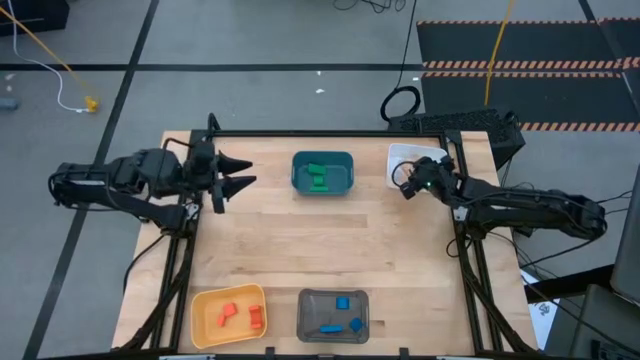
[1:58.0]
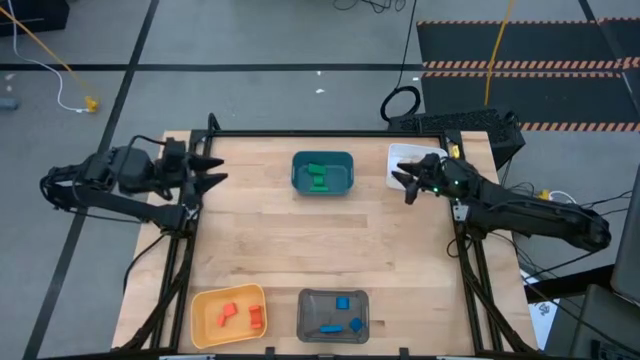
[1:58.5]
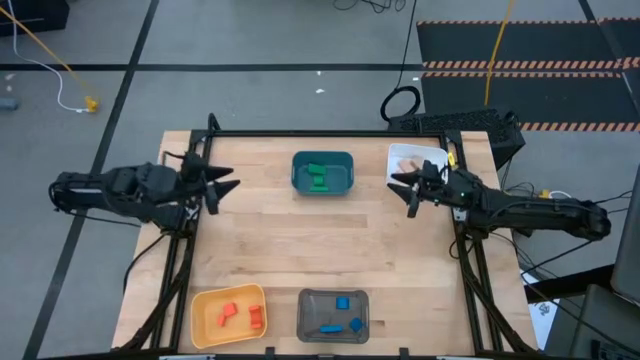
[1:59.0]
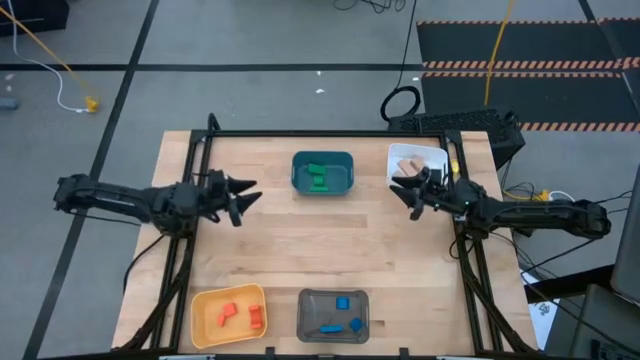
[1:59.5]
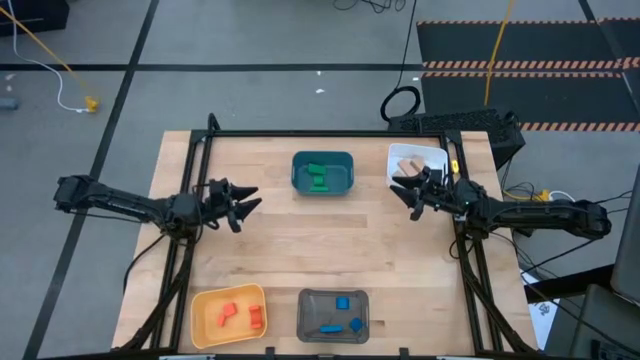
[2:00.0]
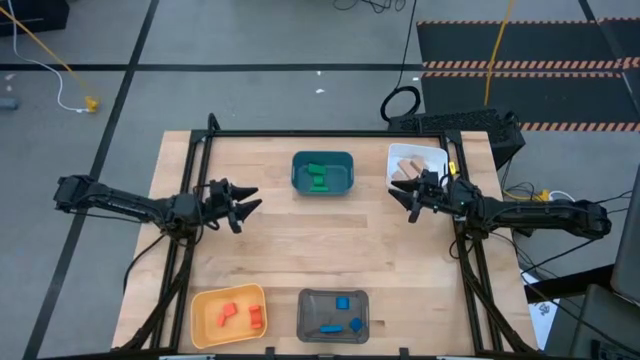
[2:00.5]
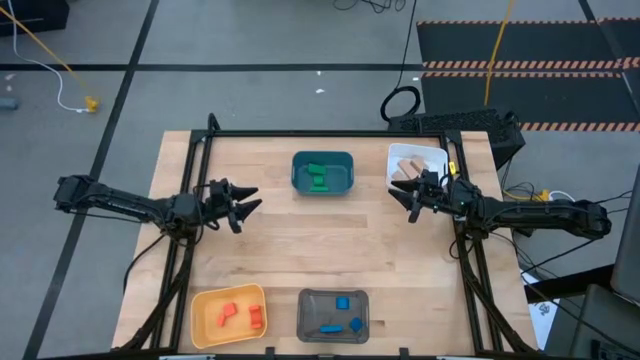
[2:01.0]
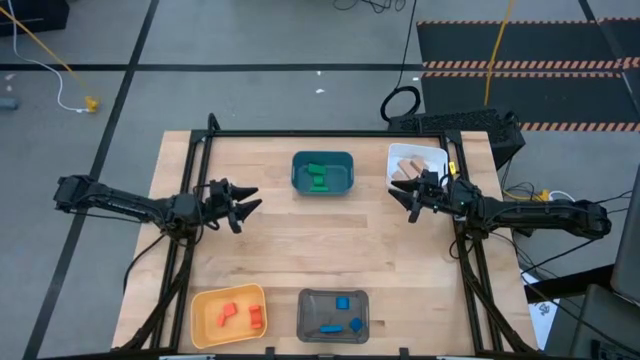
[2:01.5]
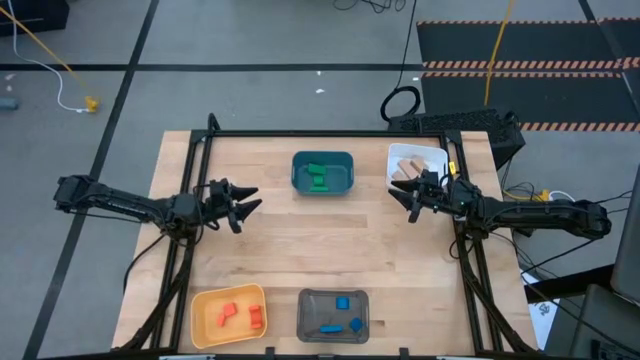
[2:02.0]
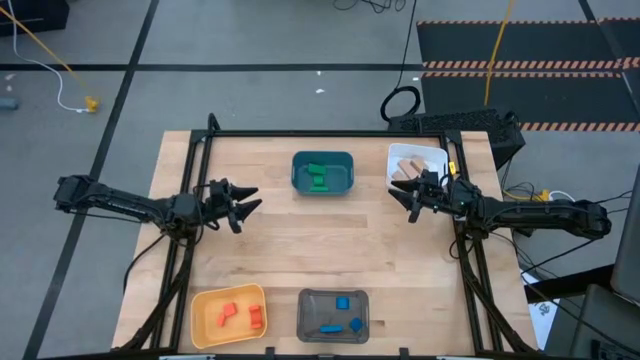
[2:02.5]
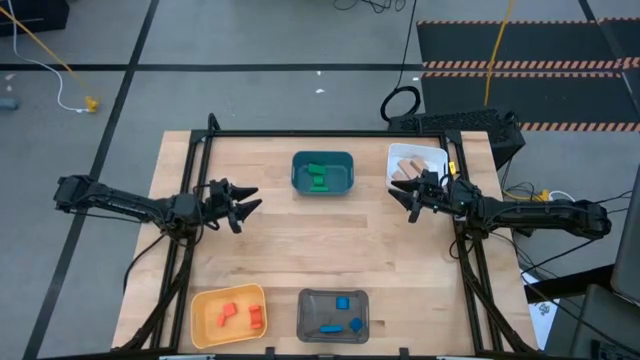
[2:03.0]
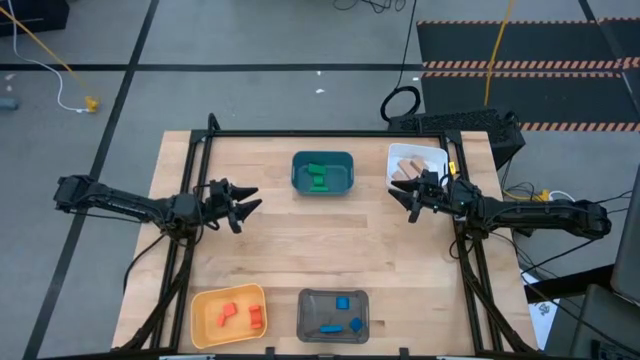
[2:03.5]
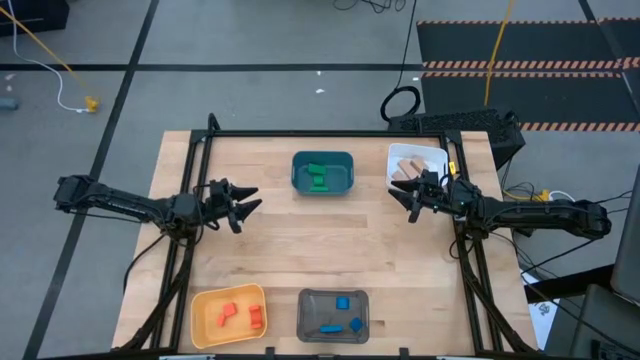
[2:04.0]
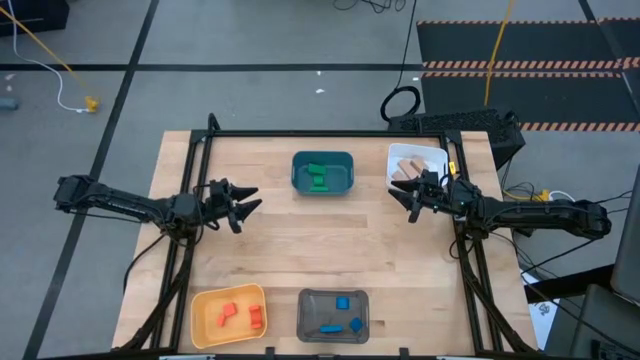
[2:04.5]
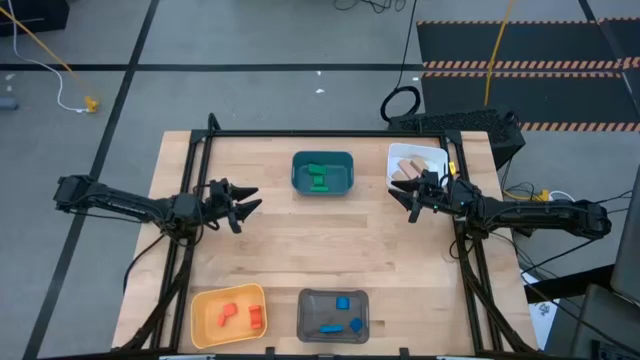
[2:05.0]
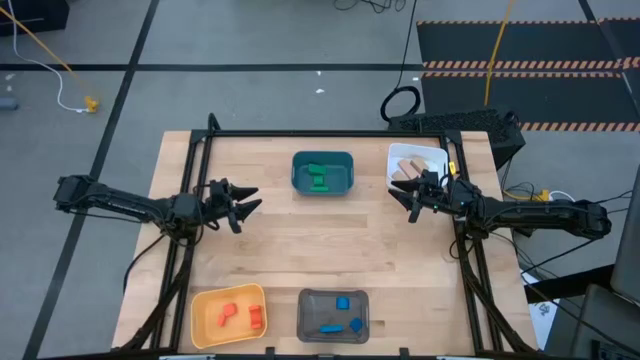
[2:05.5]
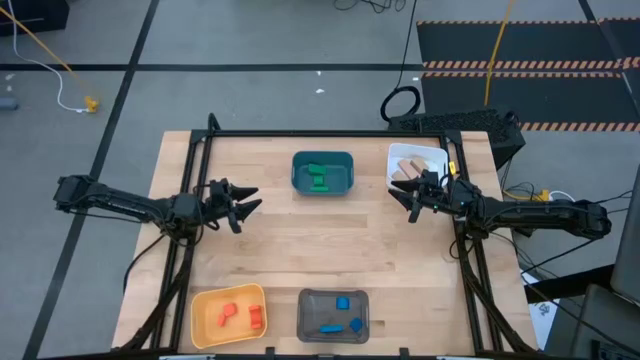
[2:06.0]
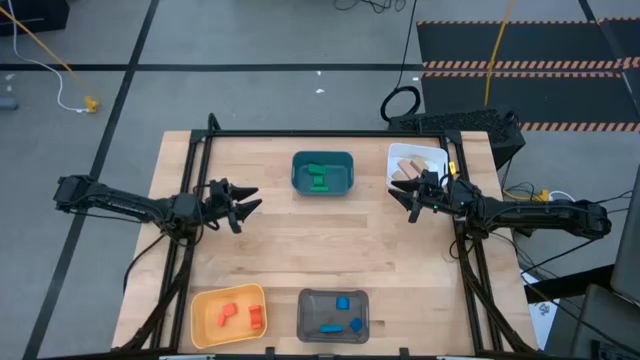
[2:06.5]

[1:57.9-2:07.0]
Task: Sort & place blocks by color
Return to Home Position

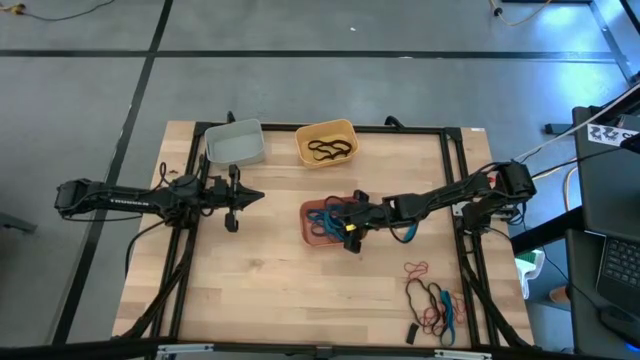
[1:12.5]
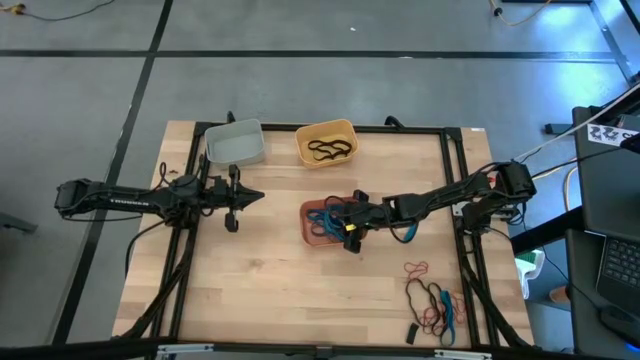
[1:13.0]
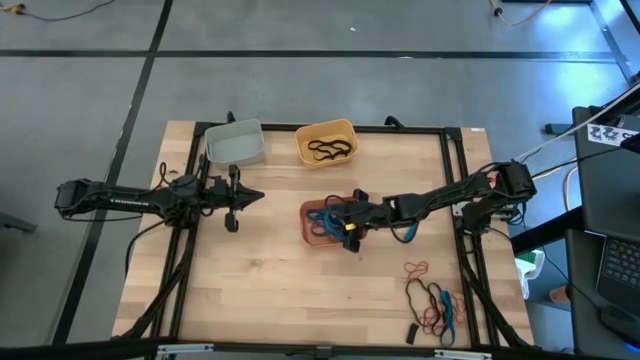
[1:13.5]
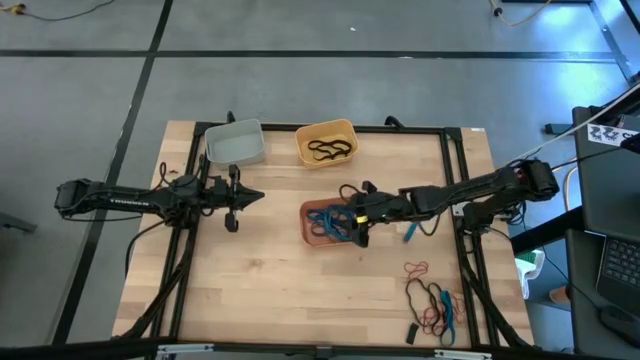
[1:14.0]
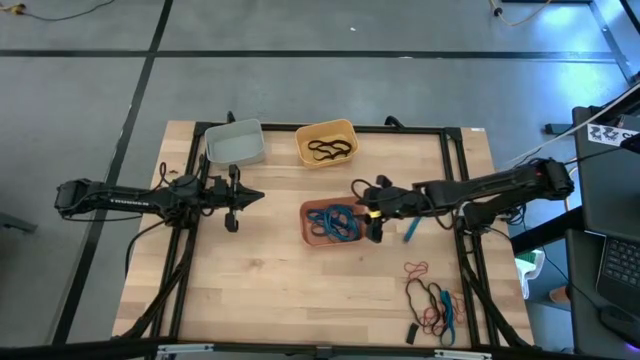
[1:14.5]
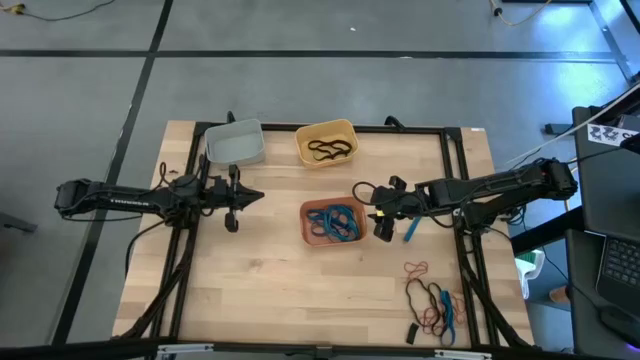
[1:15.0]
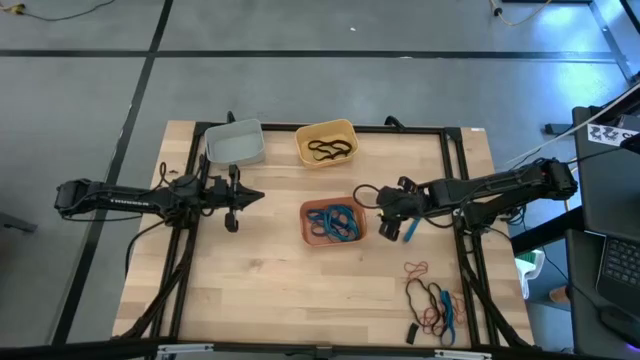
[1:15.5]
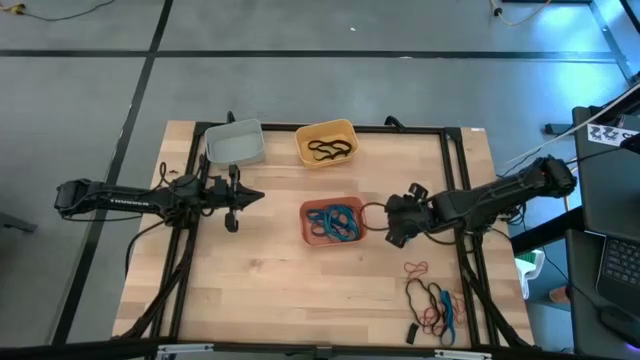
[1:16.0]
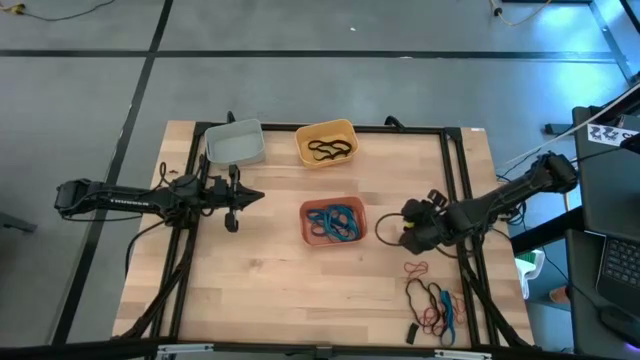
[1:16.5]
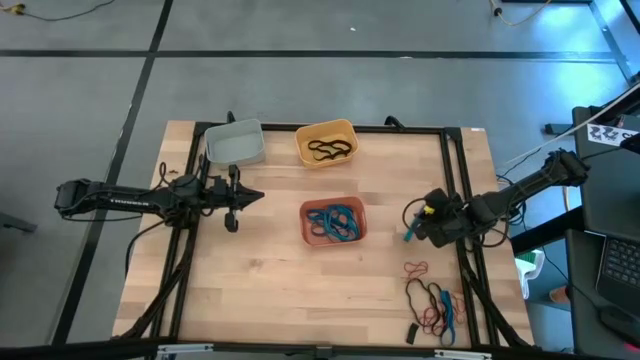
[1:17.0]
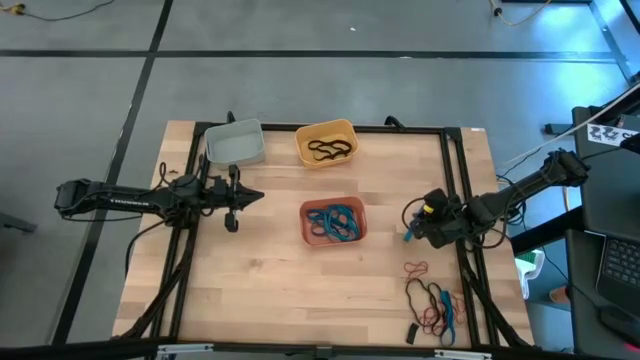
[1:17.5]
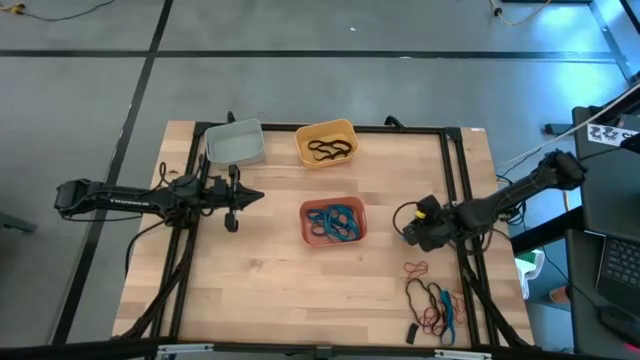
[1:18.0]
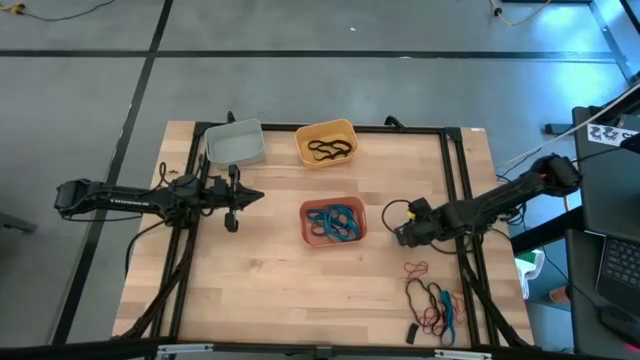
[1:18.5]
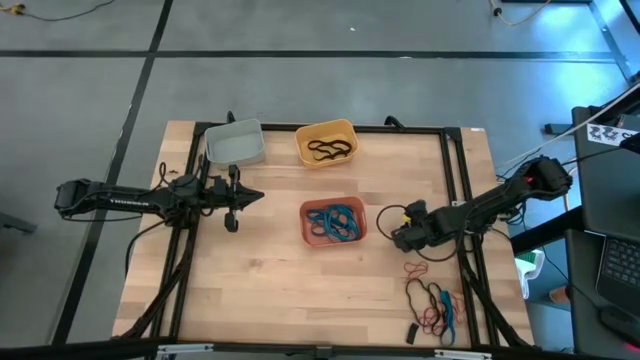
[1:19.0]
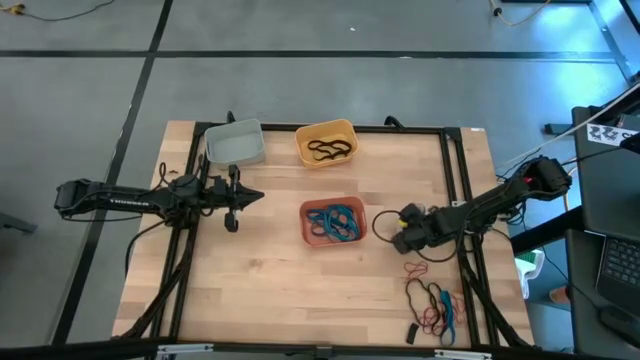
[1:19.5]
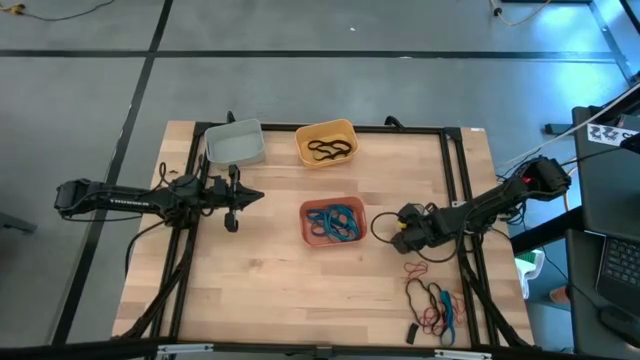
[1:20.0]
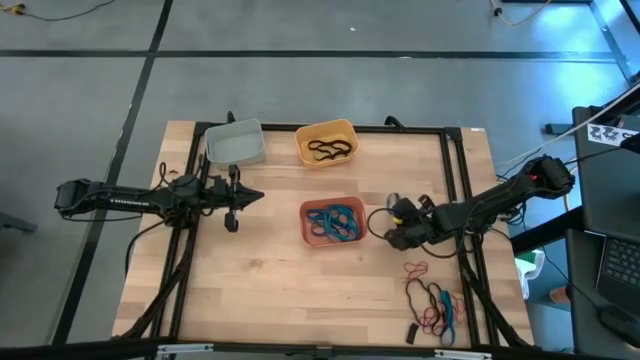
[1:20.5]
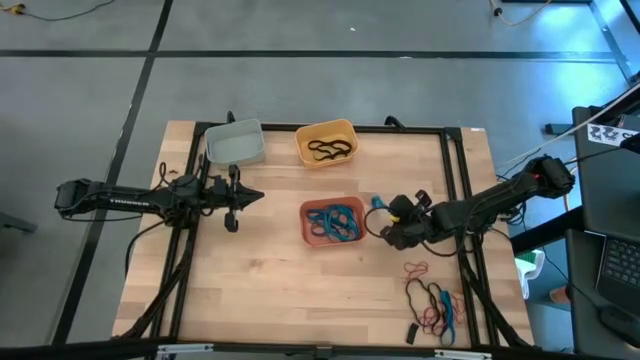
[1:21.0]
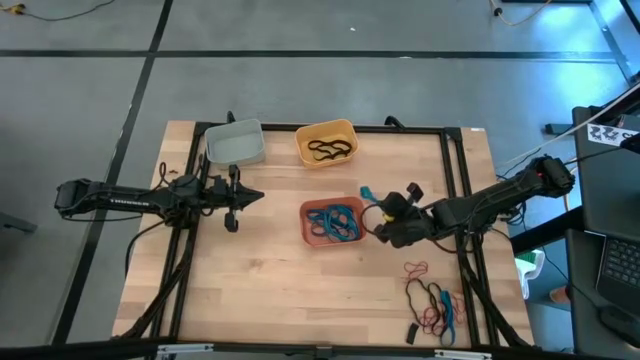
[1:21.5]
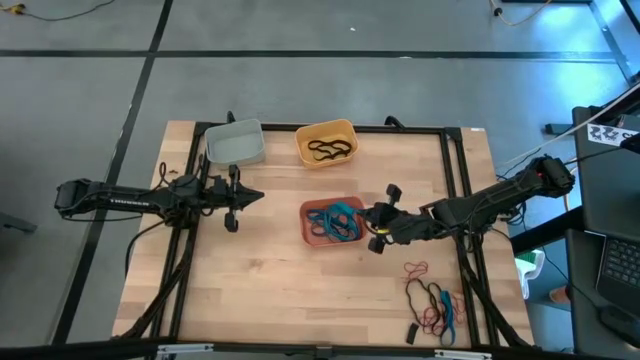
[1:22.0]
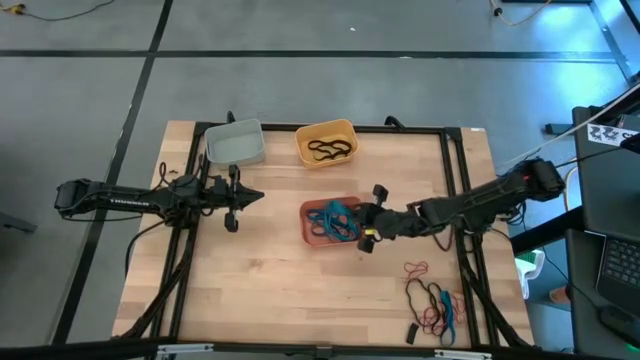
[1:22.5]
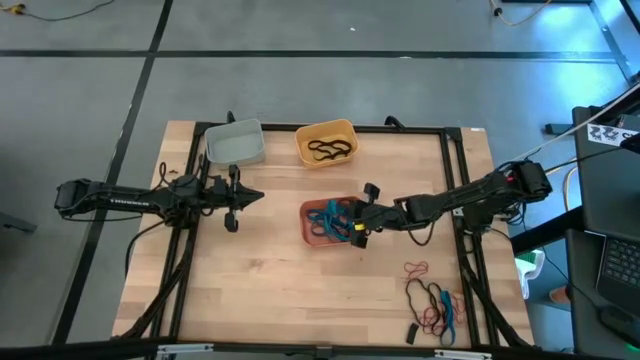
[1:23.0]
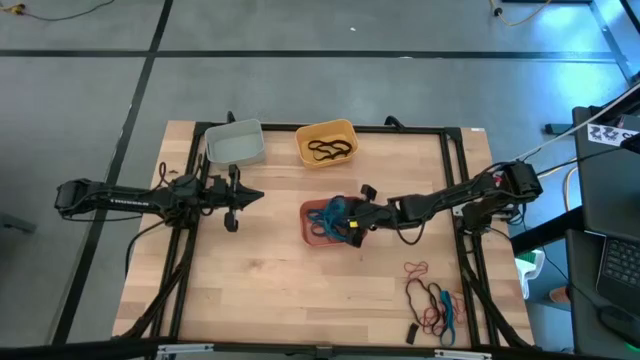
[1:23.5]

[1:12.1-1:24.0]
Task: Sort rubber bands into baskets
Put the blue rubber band into the orange bin
